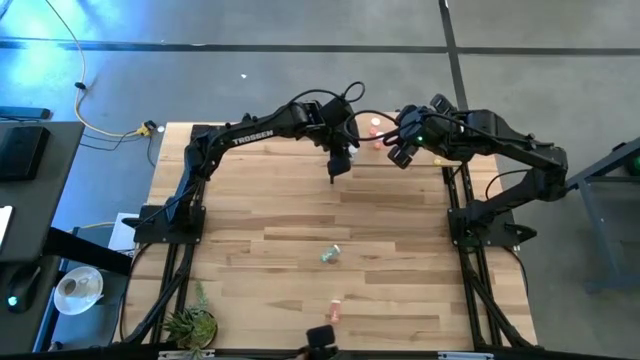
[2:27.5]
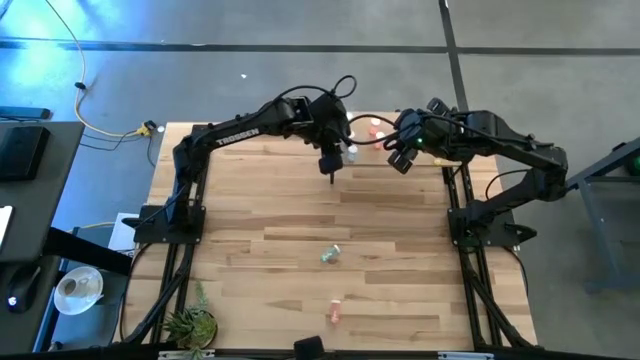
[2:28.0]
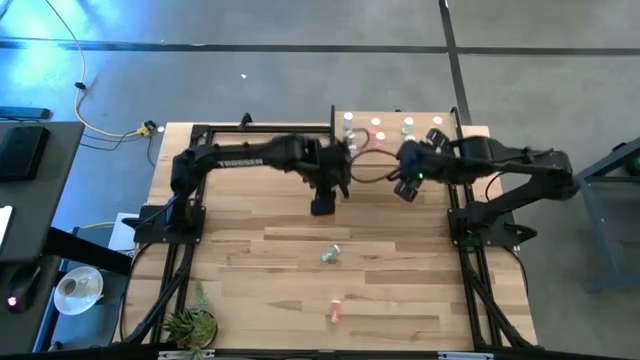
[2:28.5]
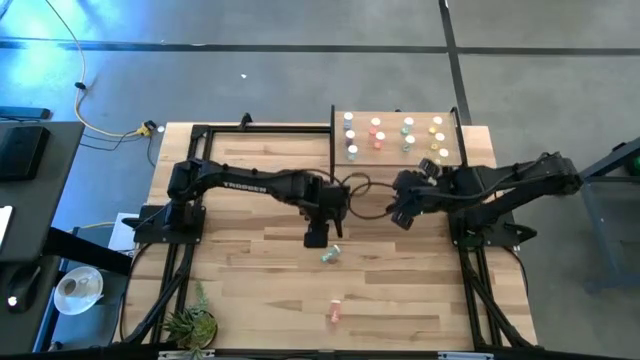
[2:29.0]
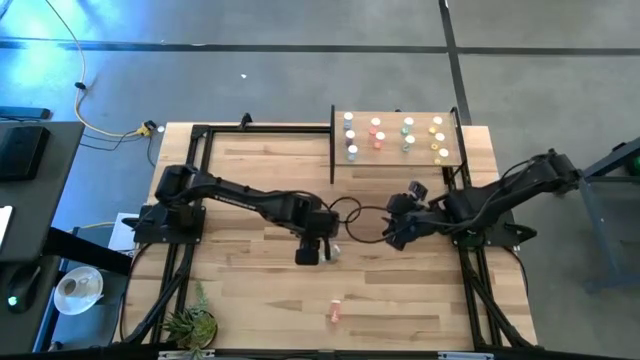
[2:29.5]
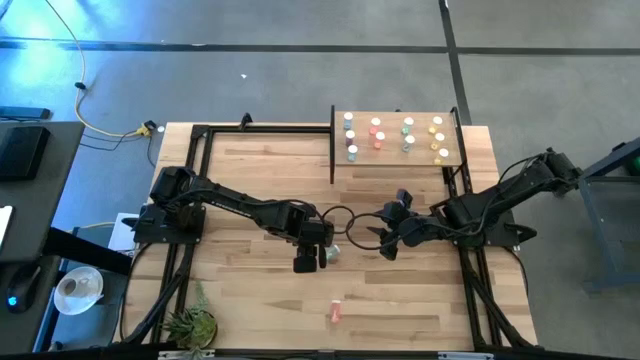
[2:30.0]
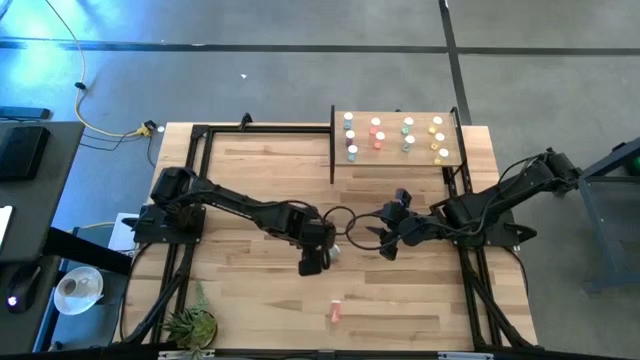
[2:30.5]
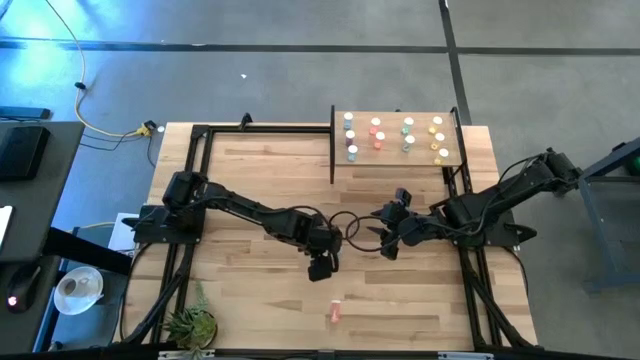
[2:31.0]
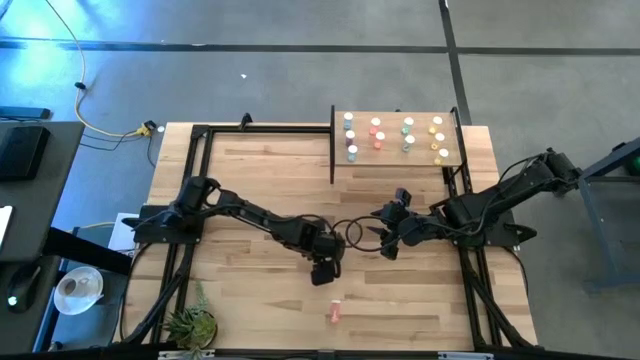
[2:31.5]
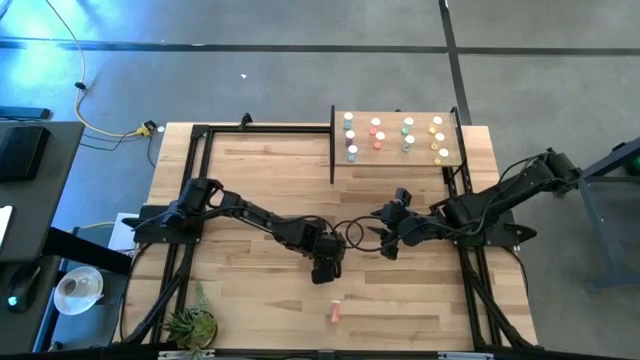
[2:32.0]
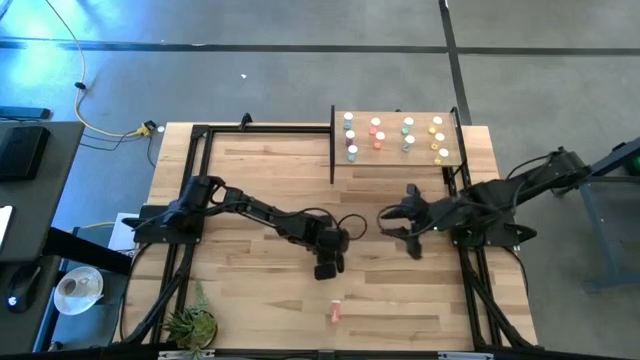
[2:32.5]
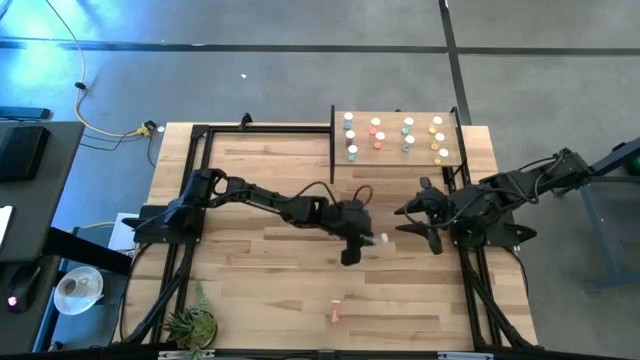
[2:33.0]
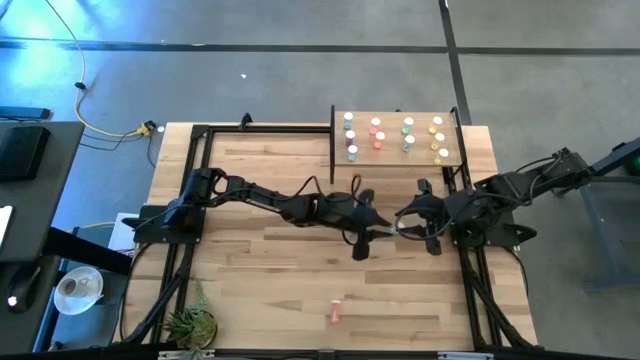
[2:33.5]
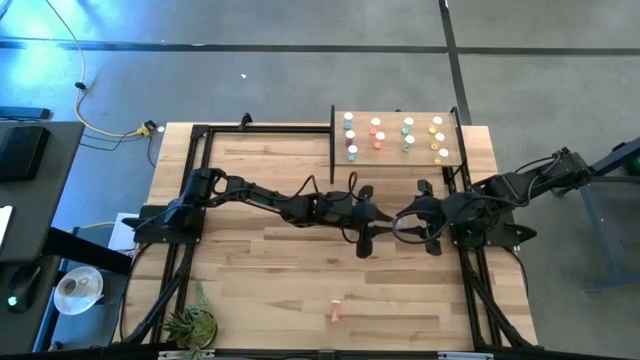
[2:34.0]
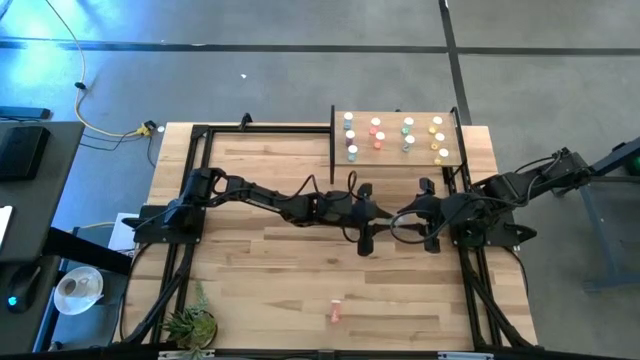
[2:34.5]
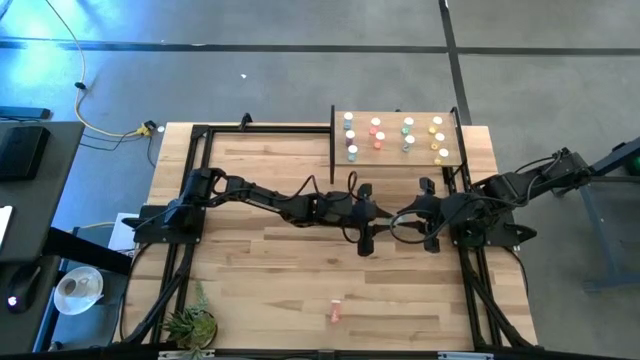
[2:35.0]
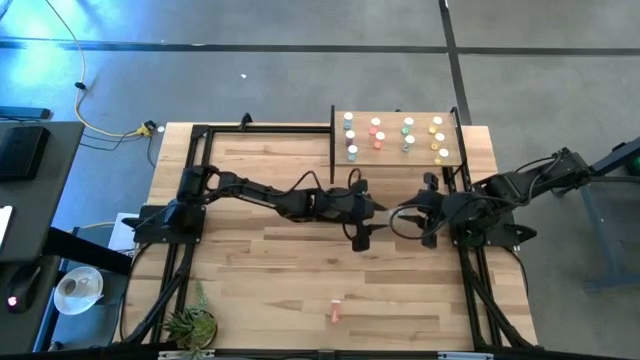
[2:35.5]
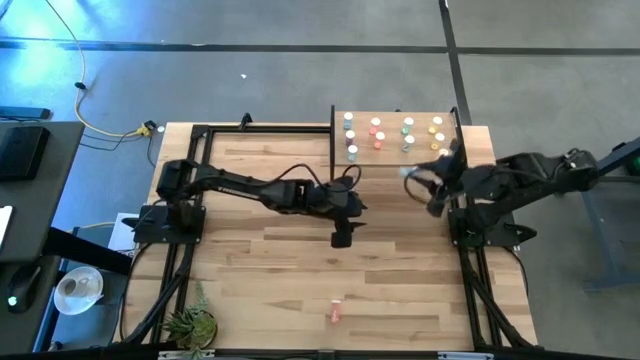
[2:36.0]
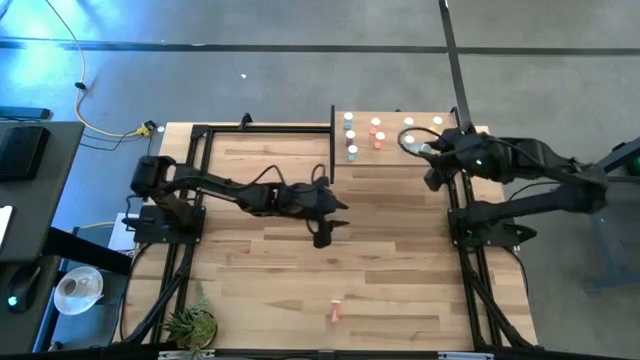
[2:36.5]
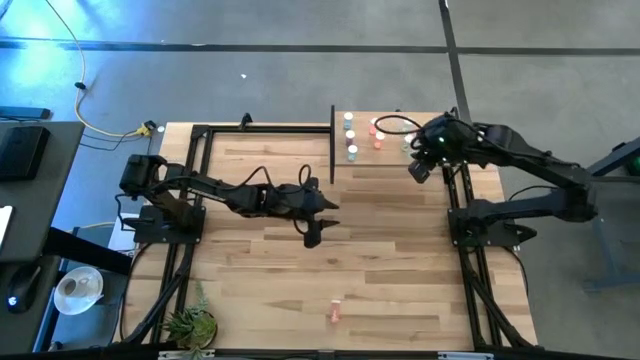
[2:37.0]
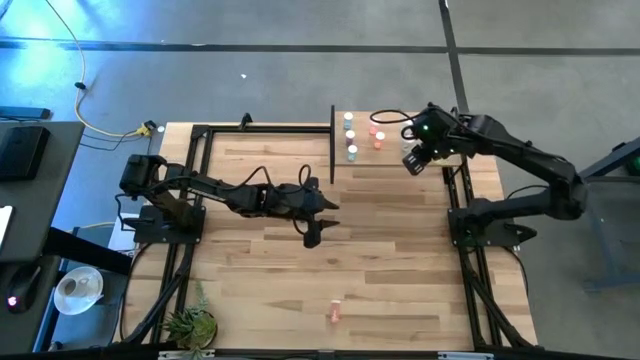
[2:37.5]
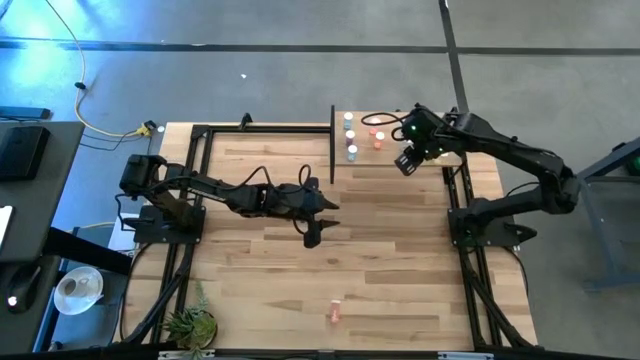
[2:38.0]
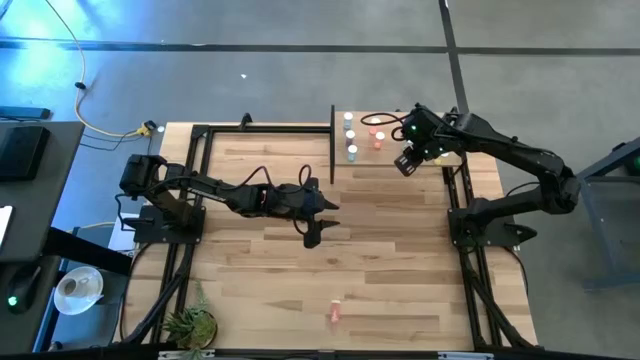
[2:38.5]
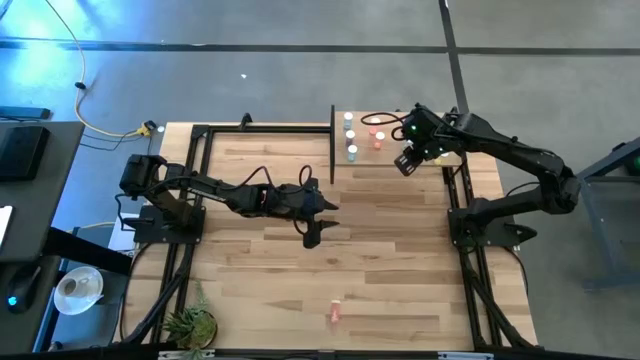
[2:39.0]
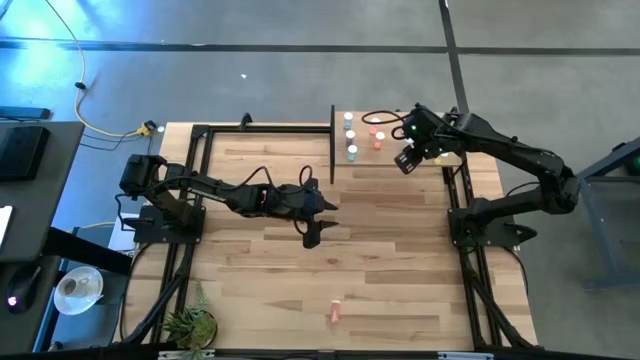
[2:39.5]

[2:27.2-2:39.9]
Task: Pick and place medicine bottles onto shelf by color
Put the green pill bottle on the shelf aligned with the green pill bottle

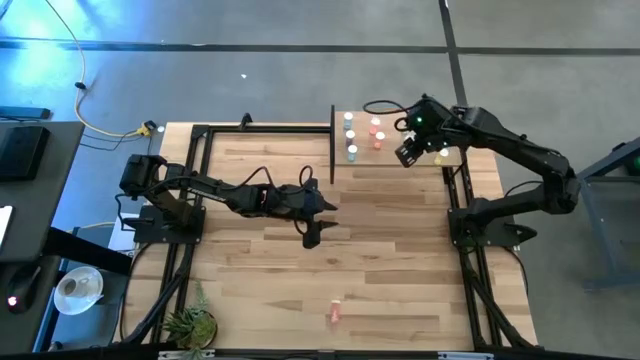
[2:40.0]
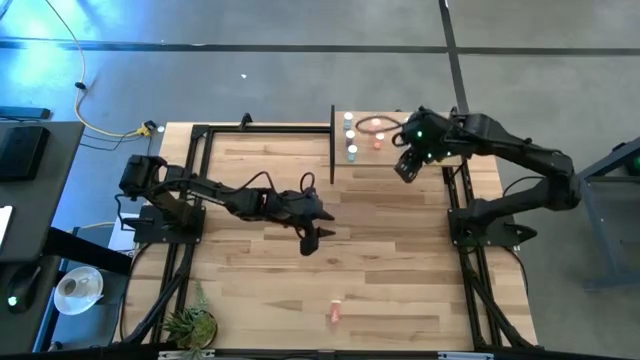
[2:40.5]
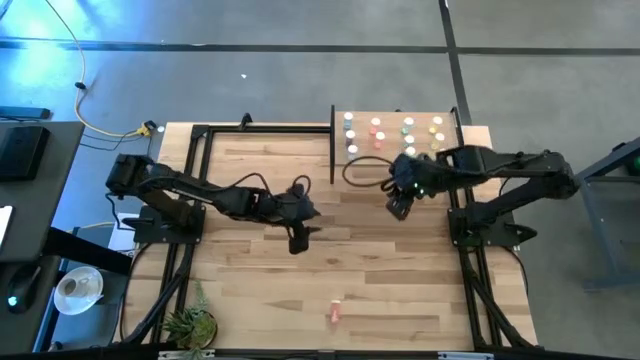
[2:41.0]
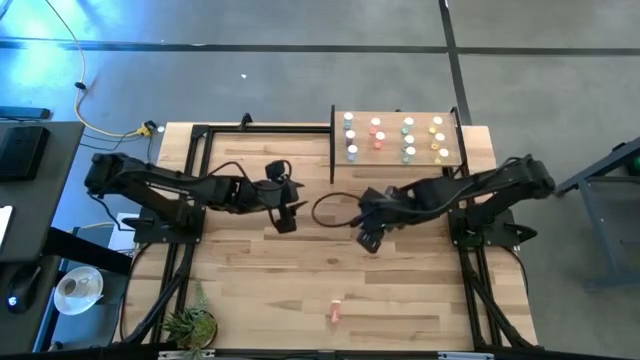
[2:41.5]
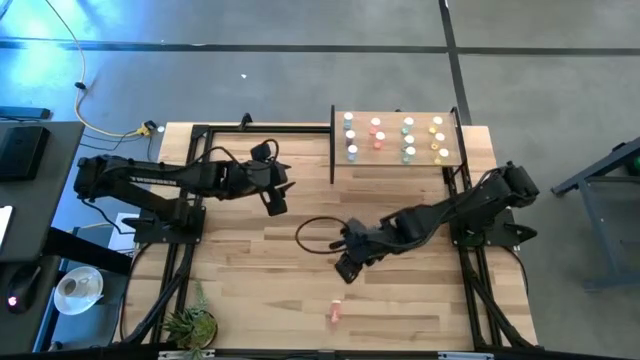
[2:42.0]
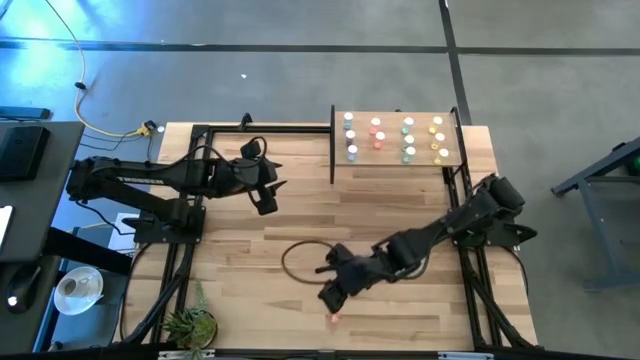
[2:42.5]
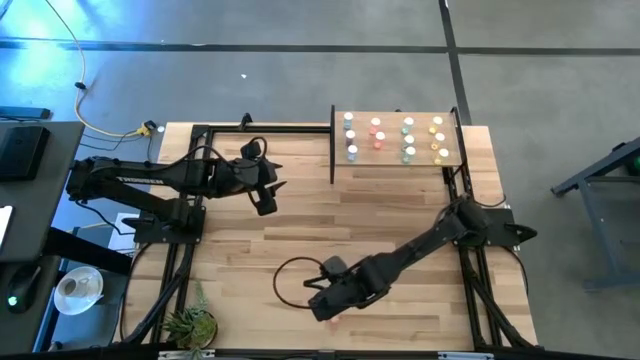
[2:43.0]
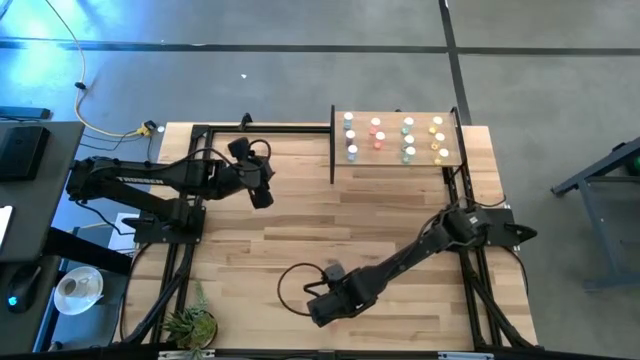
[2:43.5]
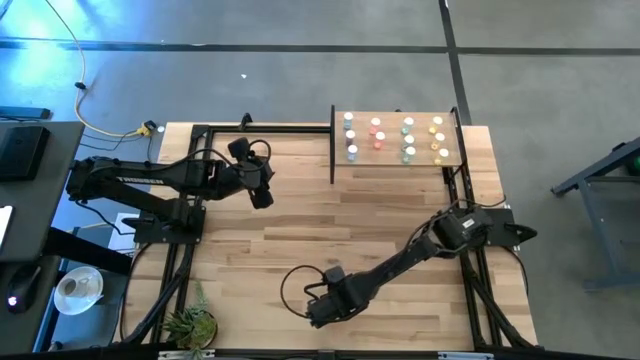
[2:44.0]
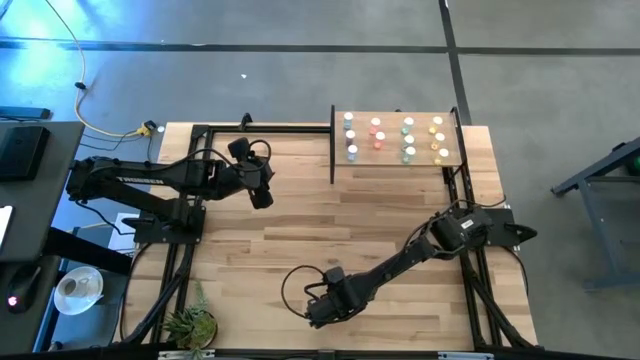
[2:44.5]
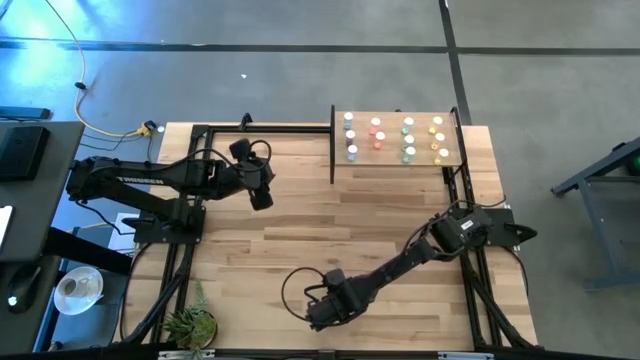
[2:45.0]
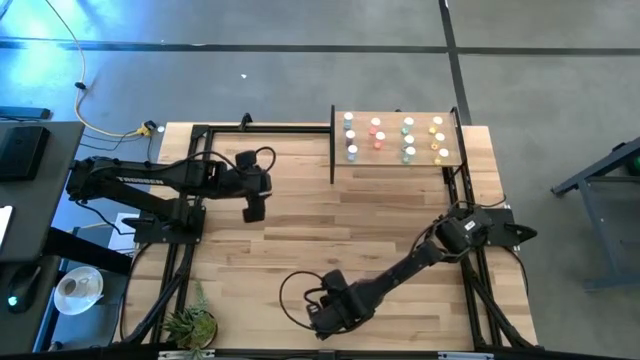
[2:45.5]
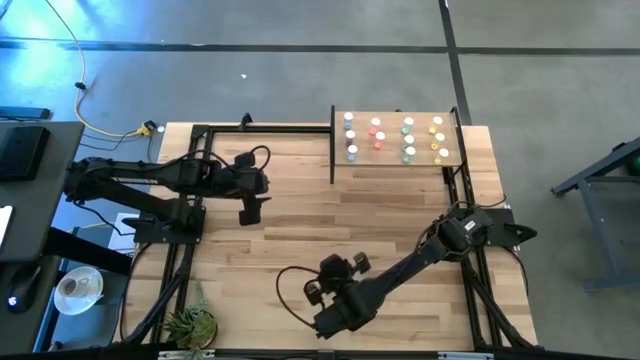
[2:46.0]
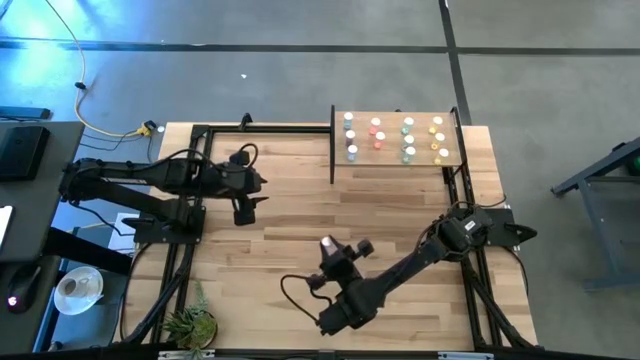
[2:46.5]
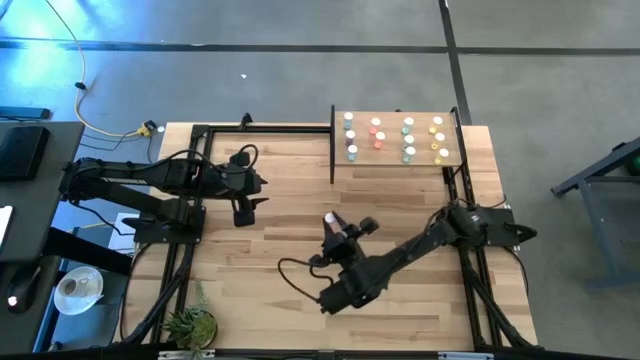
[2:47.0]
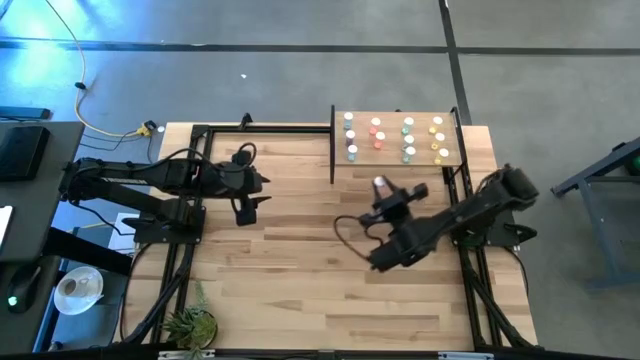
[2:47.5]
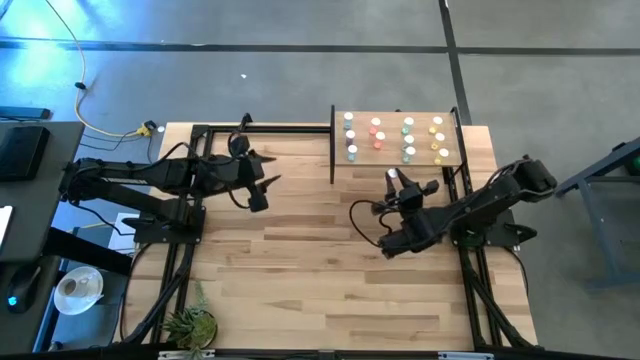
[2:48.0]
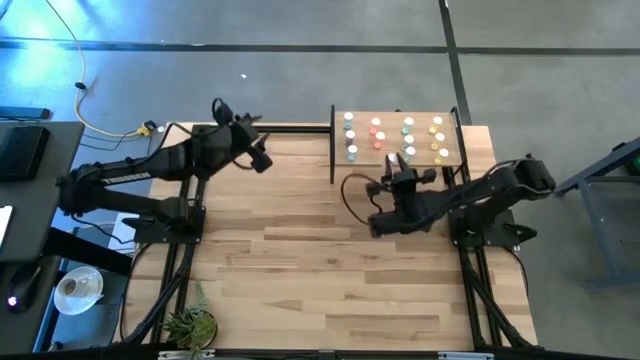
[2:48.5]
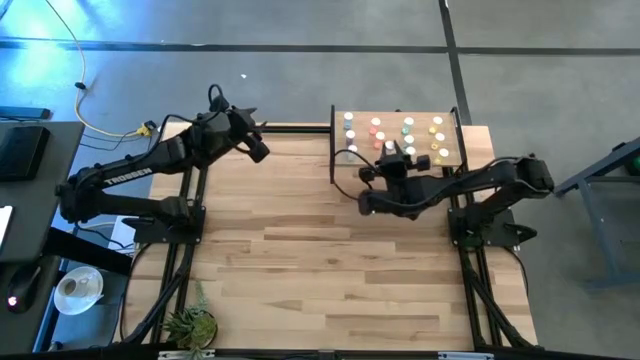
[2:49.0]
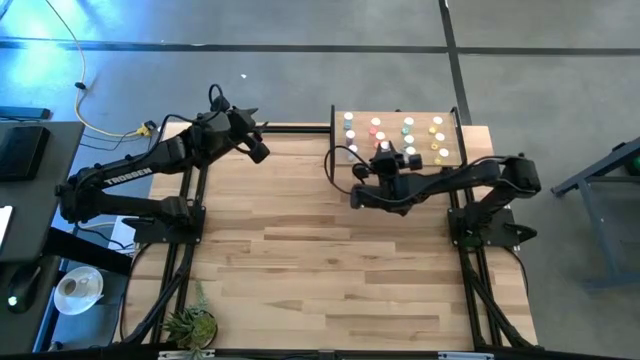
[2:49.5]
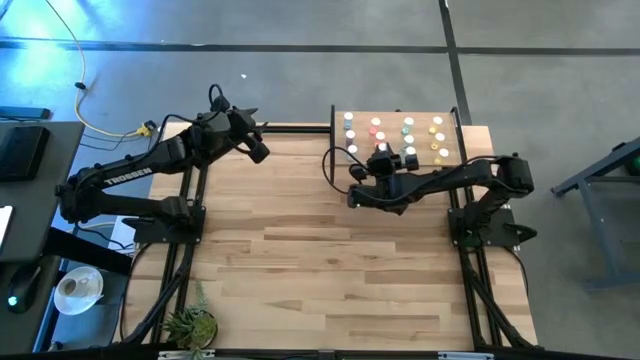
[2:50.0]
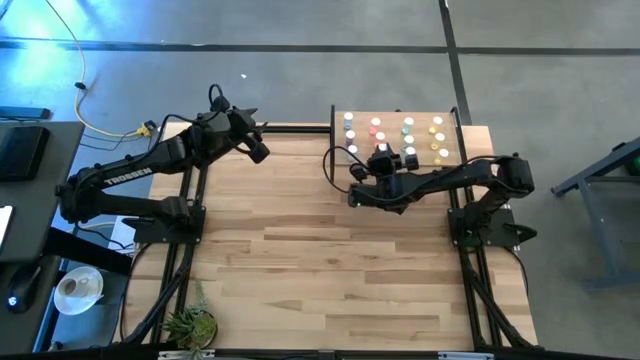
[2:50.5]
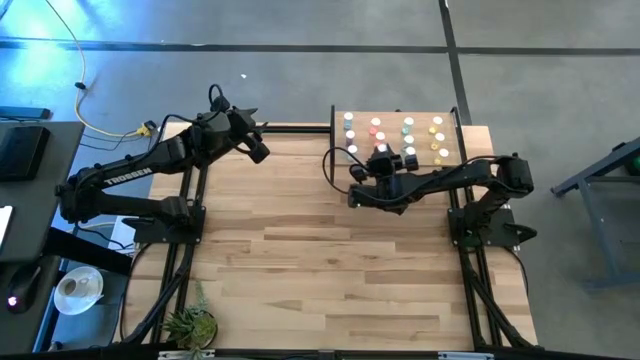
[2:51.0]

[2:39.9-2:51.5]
Put the pink pill bottle on the shelf aligned with the pink bottle
